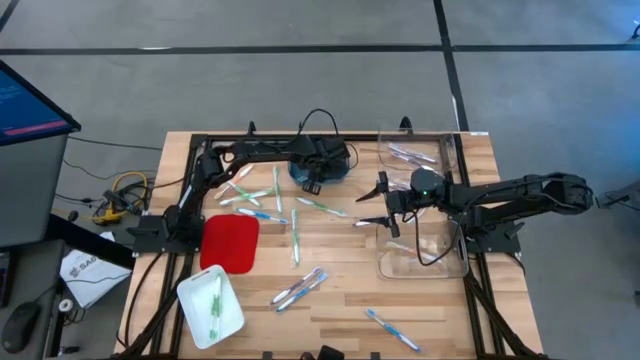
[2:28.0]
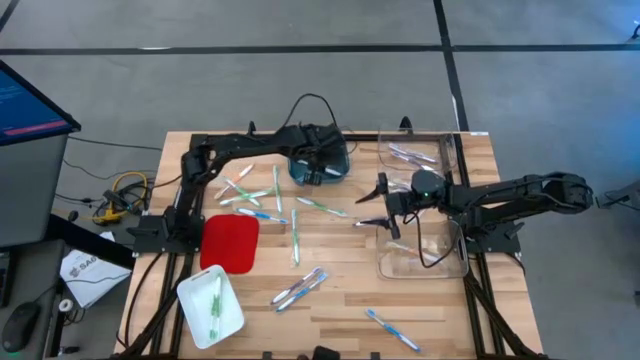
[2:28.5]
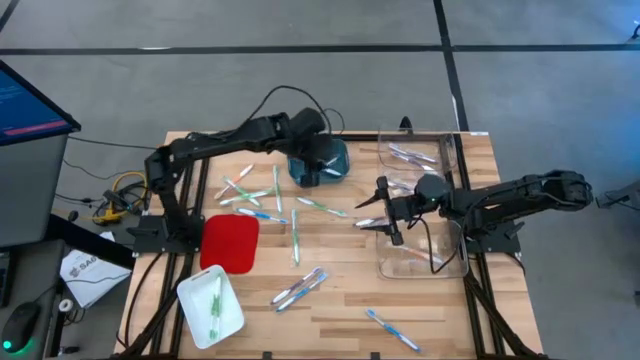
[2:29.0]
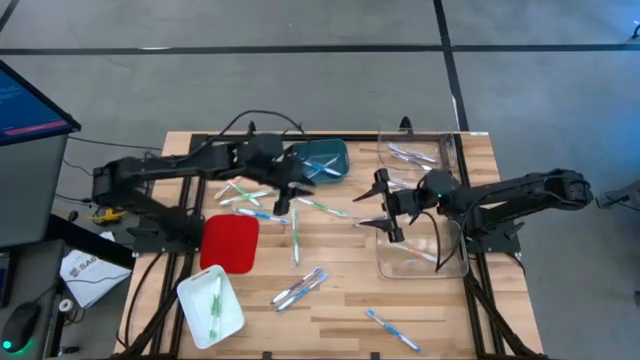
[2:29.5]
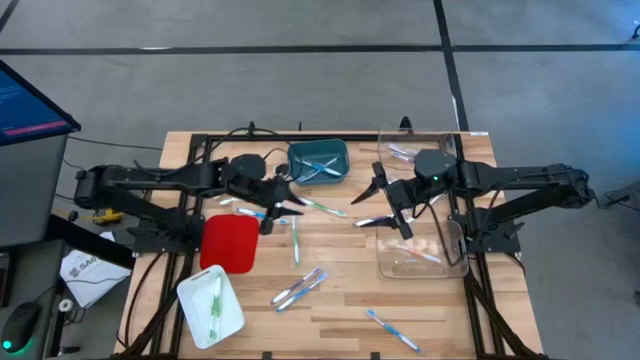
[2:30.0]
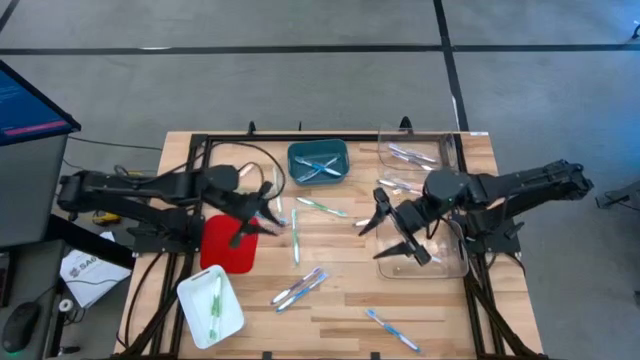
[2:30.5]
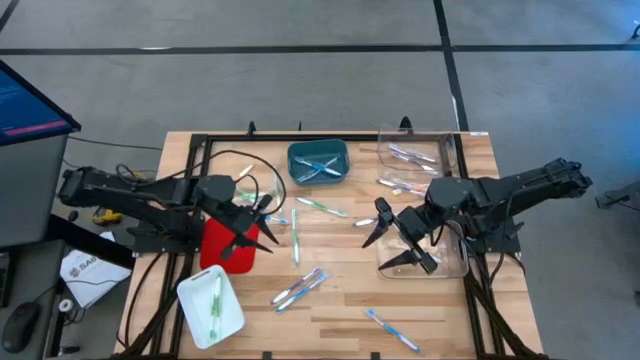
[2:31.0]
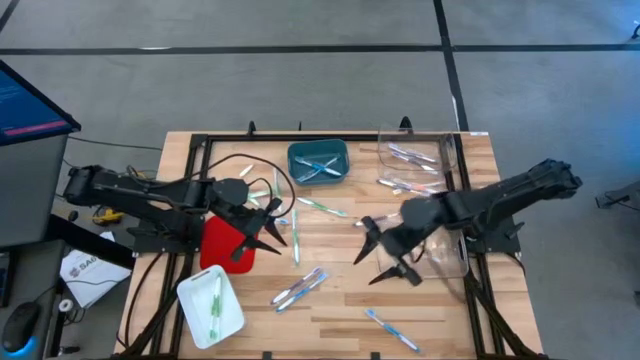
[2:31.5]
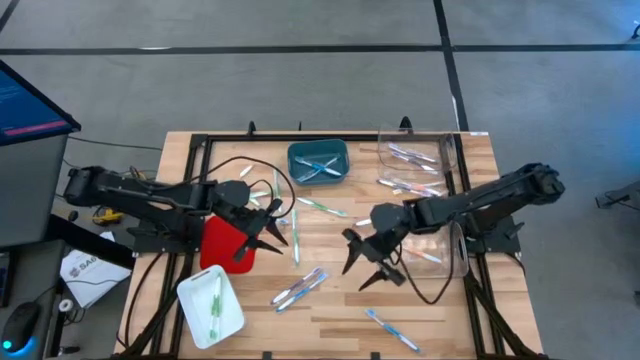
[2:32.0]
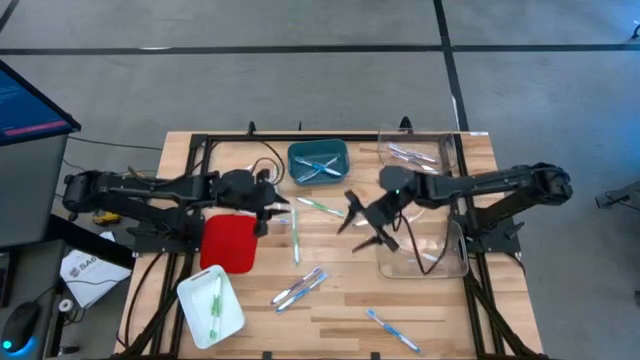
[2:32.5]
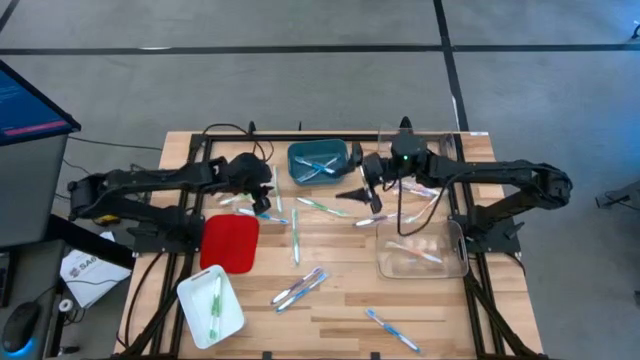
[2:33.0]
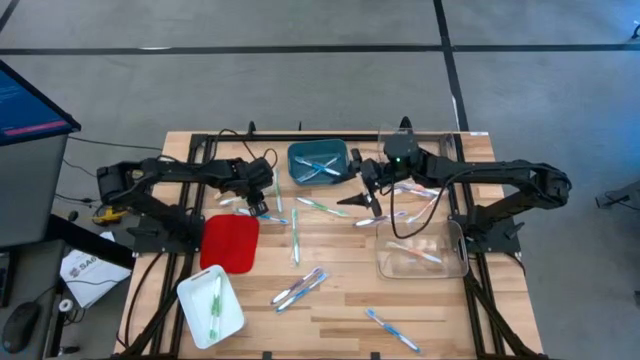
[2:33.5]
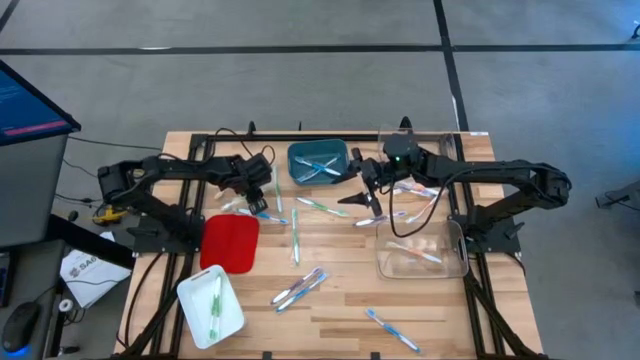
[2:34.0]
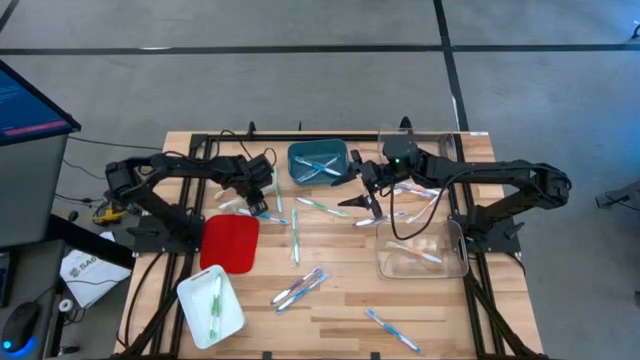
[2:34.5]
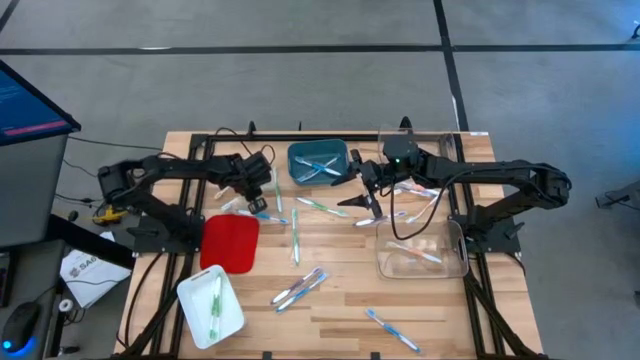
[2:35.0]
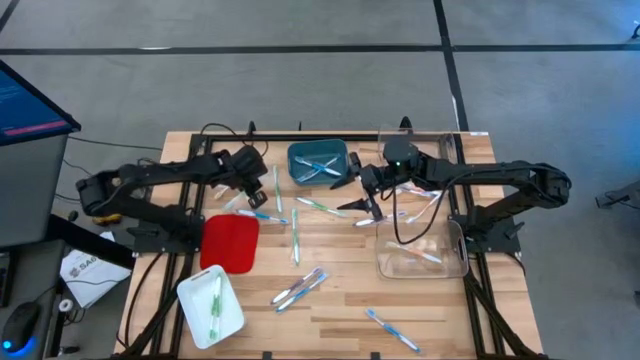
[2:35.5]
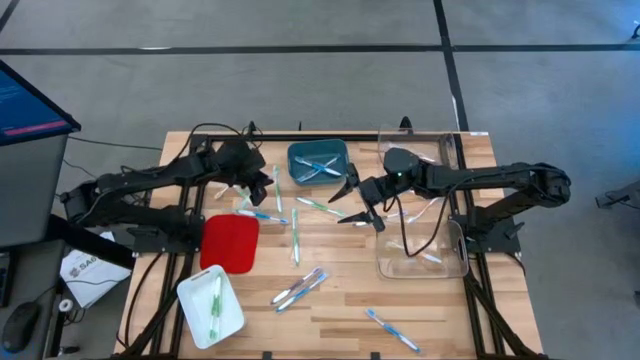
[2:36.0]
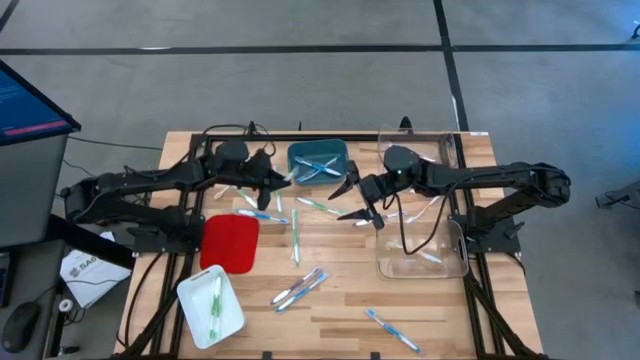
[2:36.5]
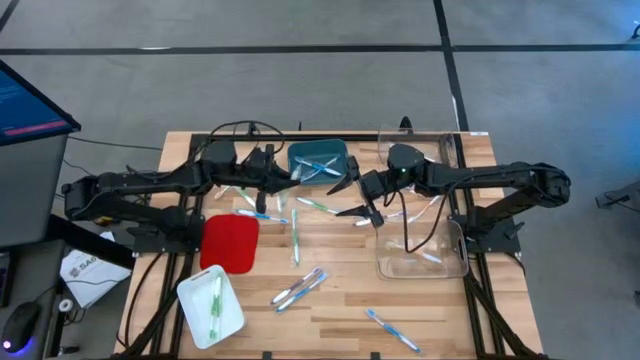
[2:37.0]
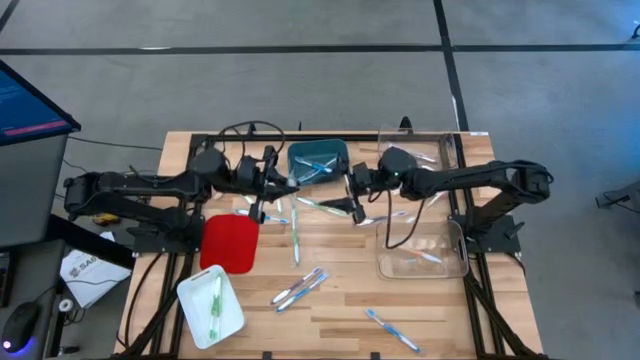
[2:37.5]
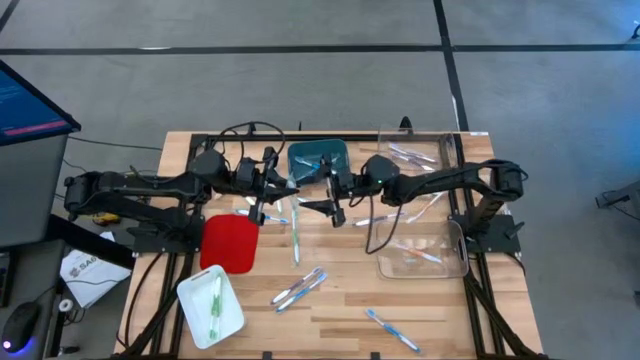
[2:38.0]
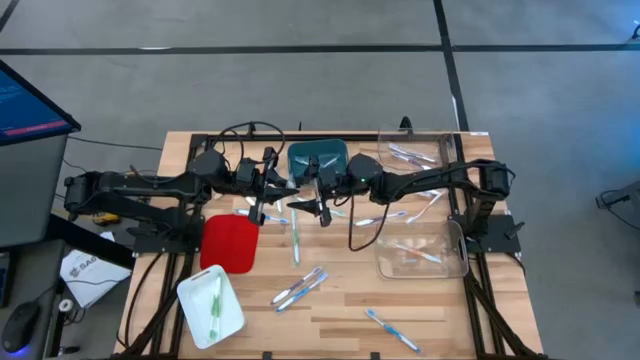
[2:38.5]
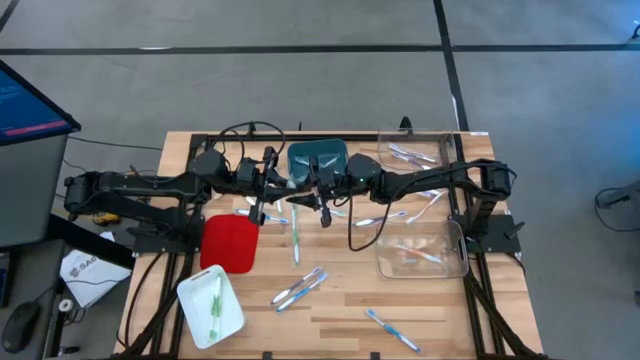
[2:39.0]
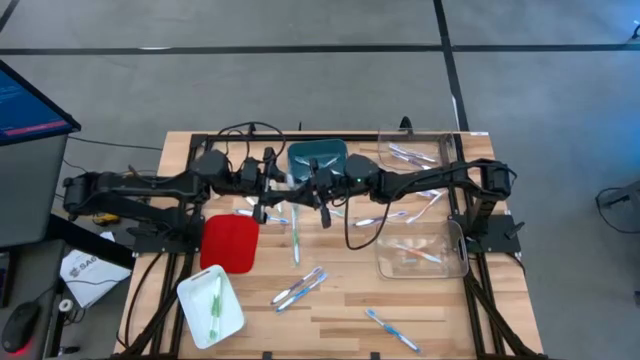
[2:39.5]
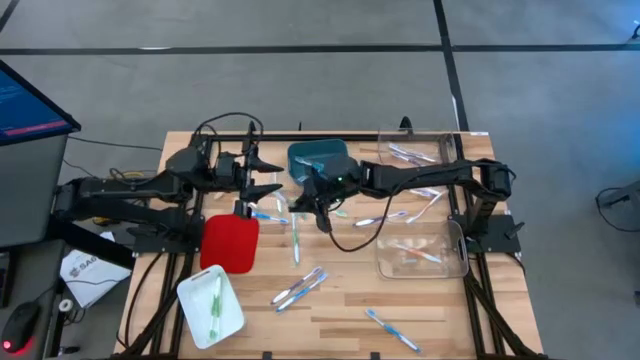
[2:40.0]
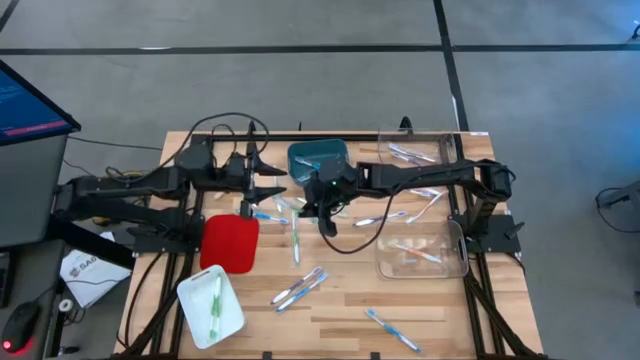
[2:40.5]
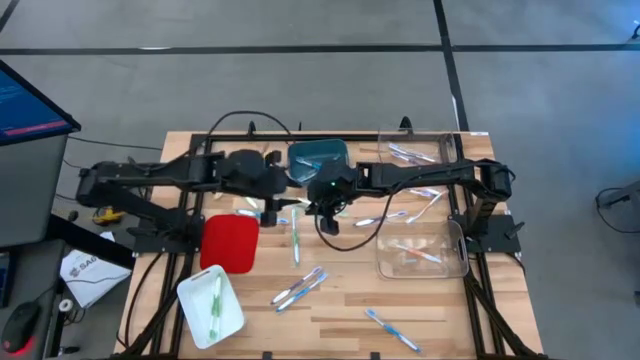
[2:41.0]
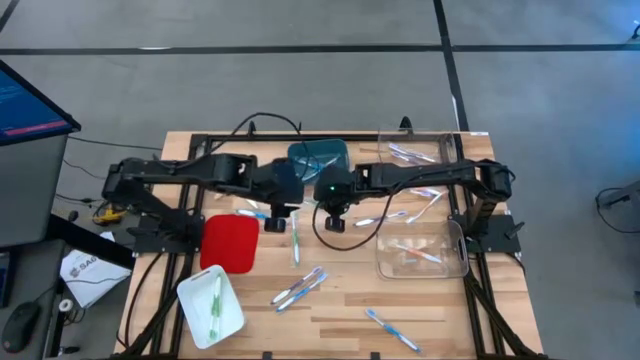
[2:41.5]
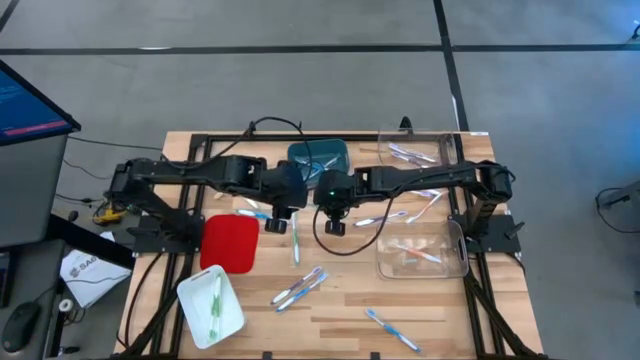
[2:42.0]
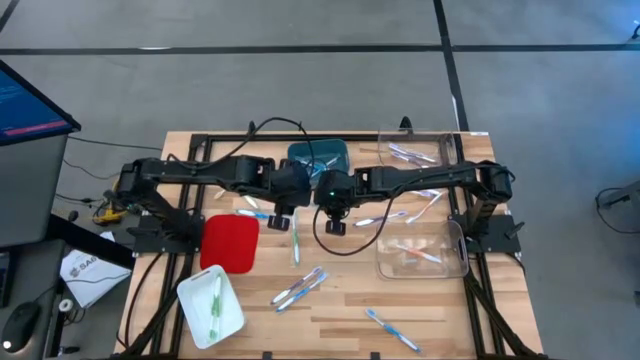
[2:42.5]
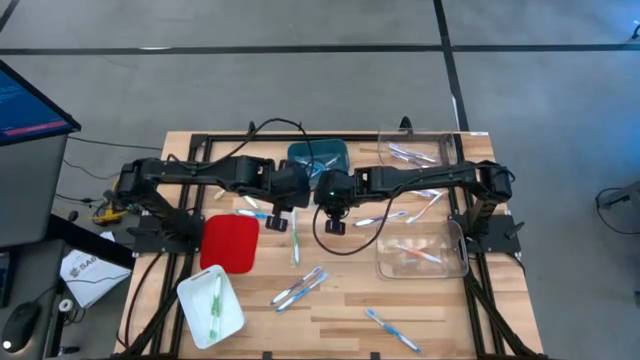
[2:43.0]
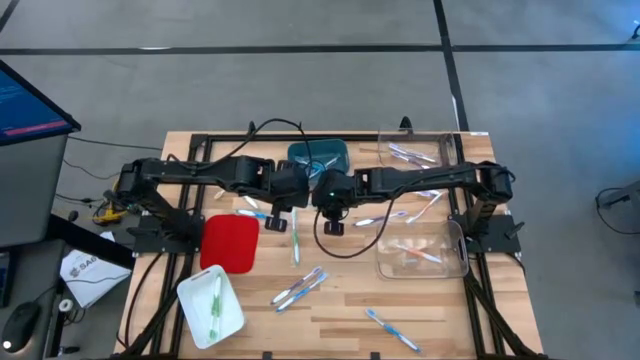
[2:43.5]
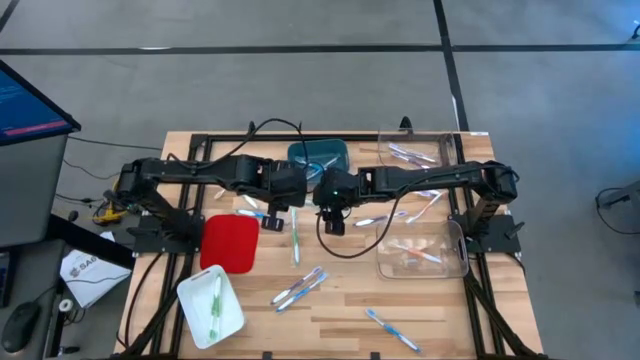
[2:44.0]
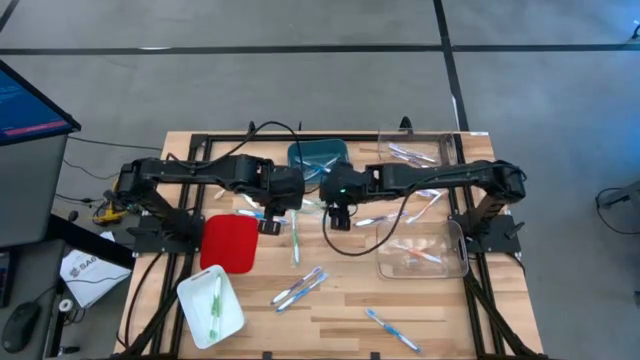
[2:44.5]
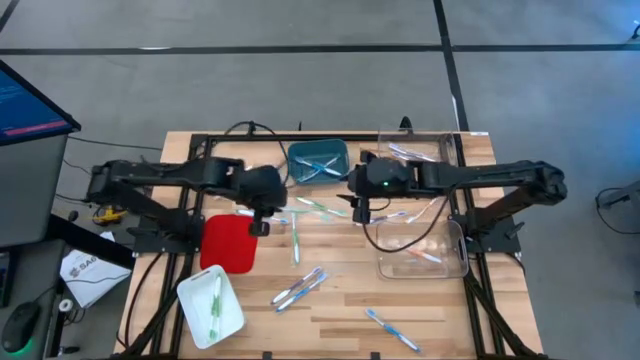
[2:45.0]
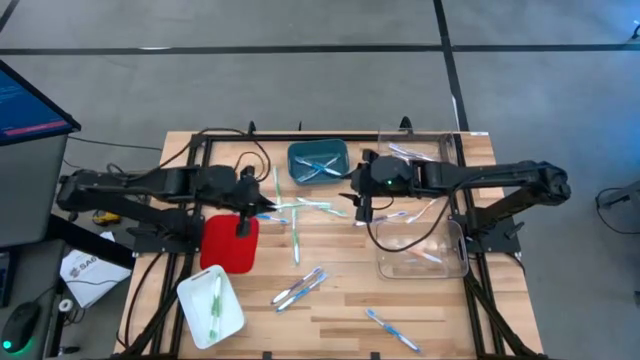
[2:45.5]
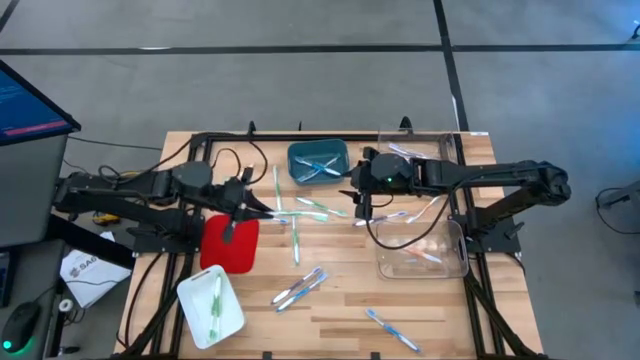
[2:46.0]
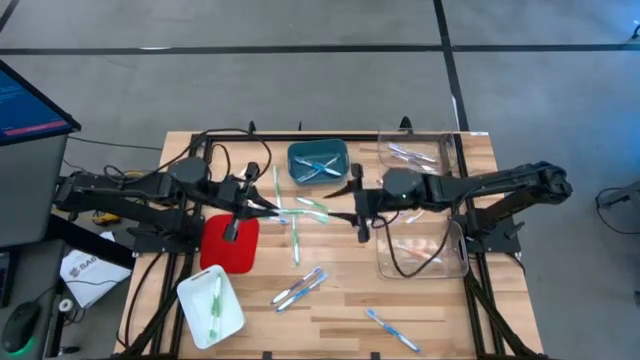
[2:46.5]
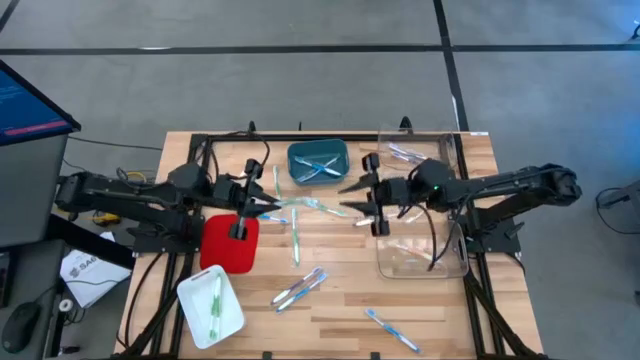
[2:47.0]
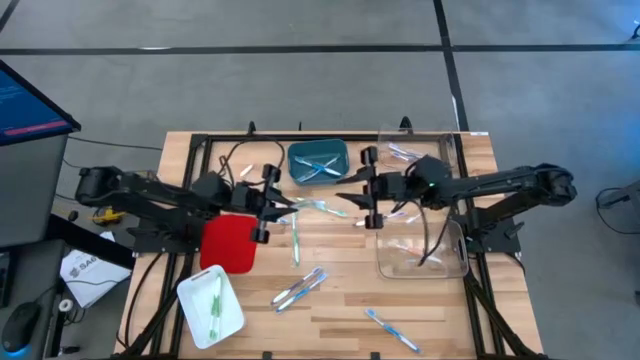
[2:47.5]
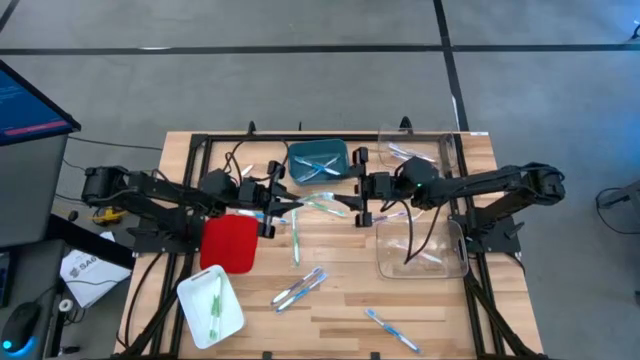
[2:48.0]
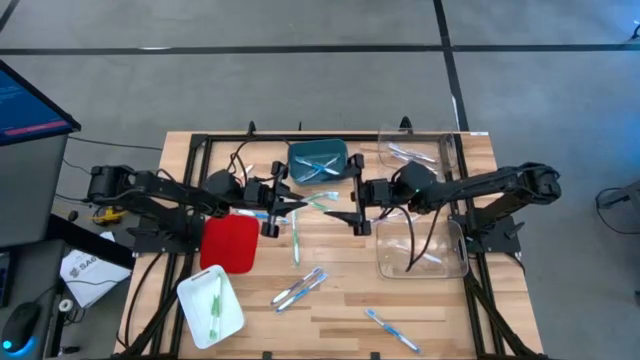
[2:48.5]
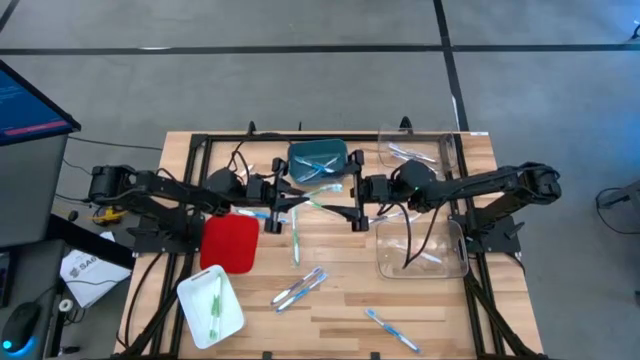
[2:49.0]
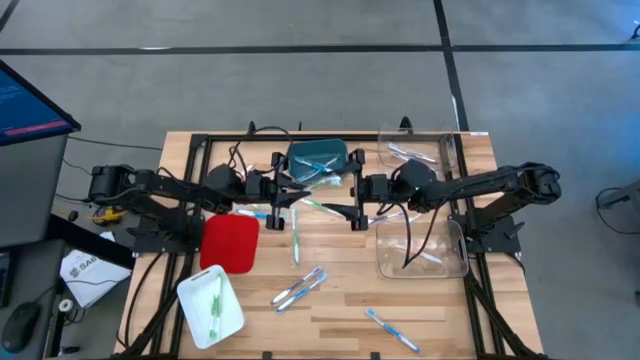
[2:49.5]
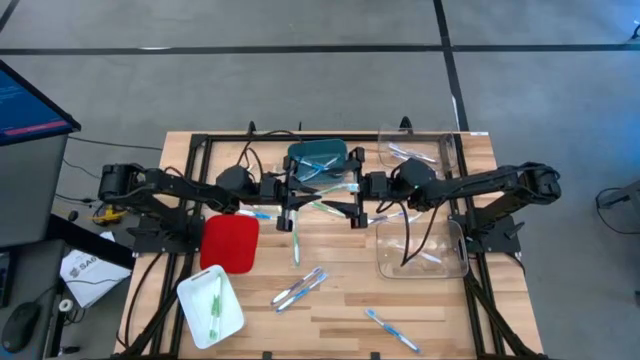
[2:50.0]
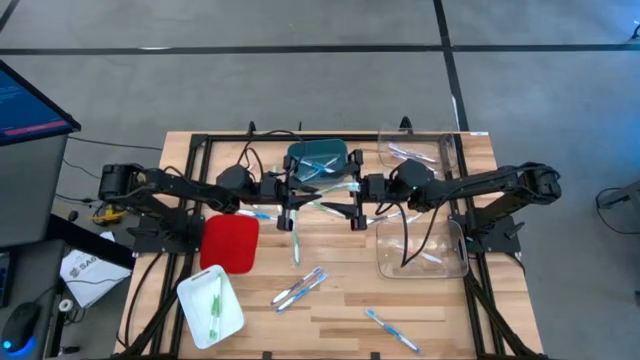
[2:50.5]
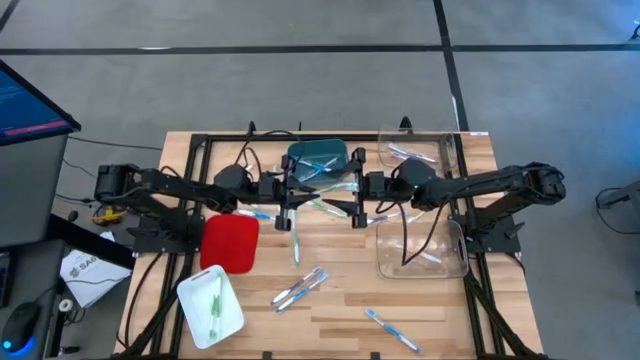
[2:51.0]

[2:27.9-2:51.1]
Task: Pick & Place Toothbrushes
Put the green toothbrush into the white bin
